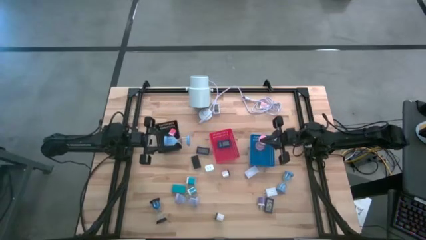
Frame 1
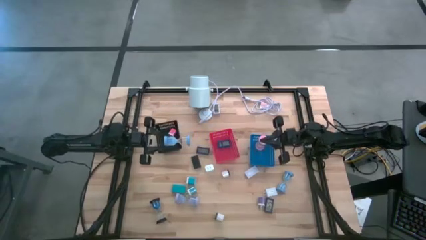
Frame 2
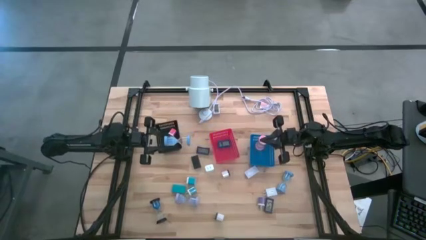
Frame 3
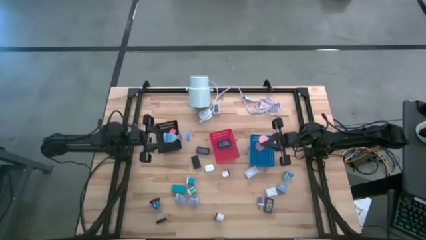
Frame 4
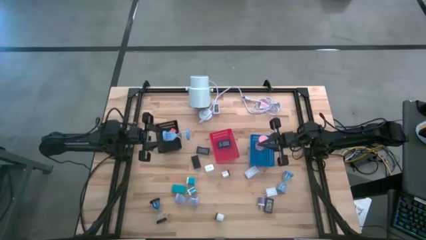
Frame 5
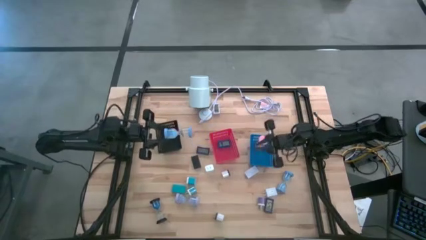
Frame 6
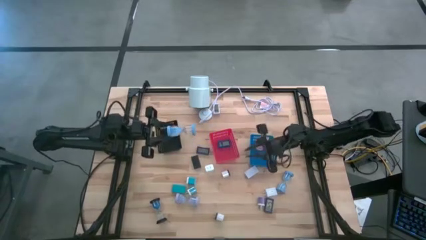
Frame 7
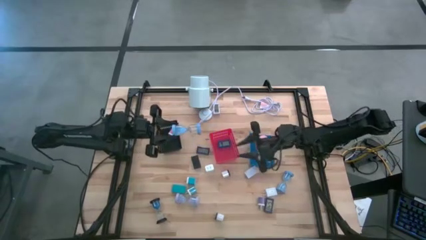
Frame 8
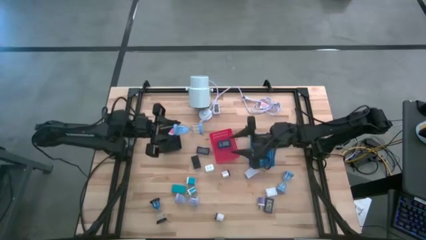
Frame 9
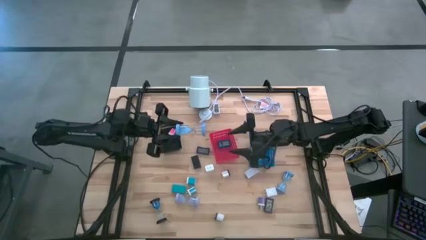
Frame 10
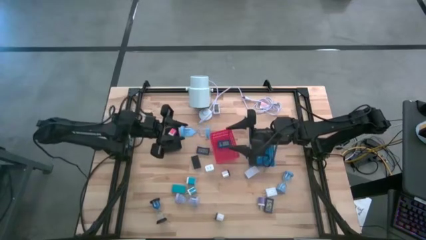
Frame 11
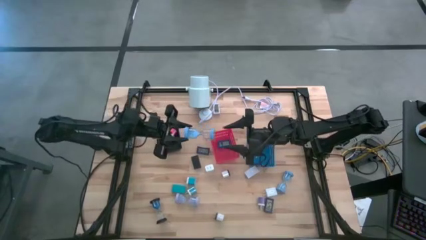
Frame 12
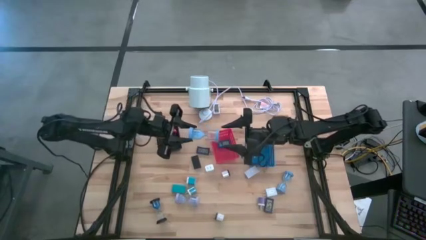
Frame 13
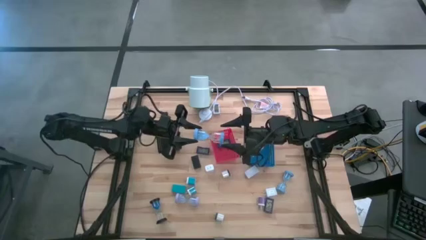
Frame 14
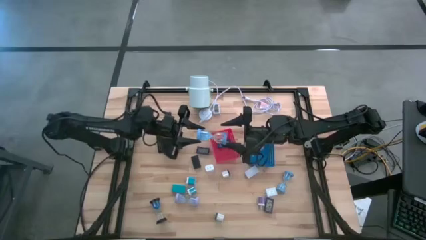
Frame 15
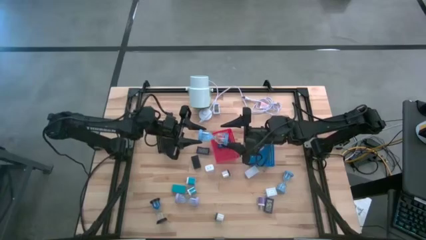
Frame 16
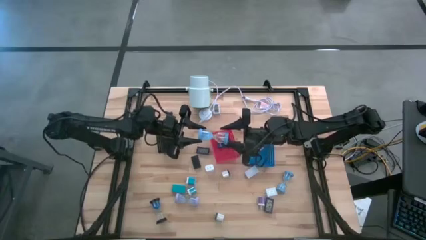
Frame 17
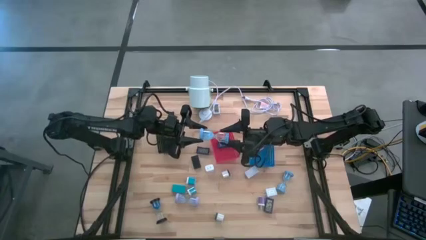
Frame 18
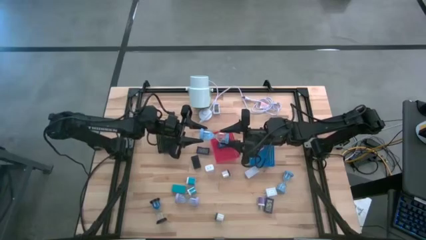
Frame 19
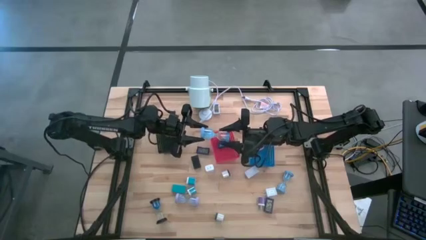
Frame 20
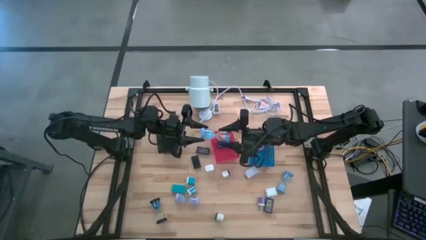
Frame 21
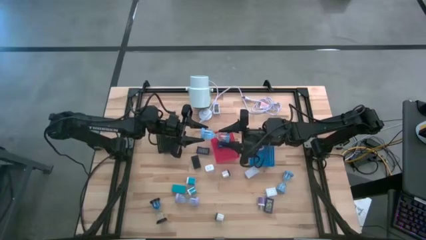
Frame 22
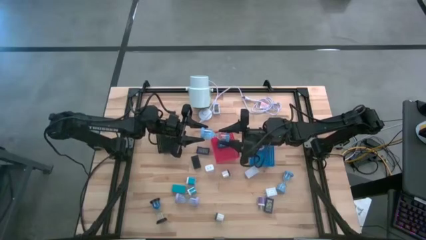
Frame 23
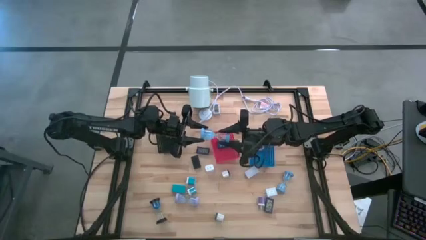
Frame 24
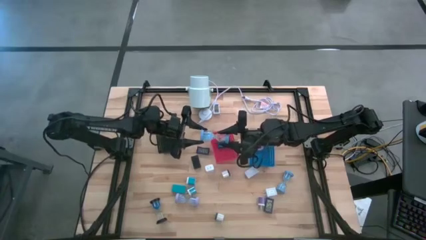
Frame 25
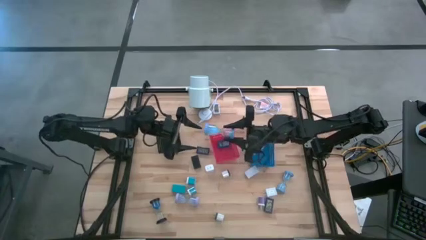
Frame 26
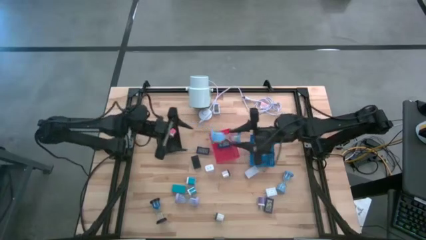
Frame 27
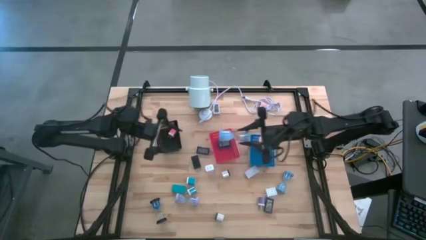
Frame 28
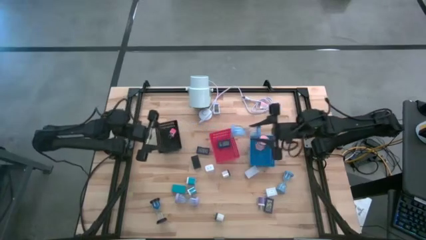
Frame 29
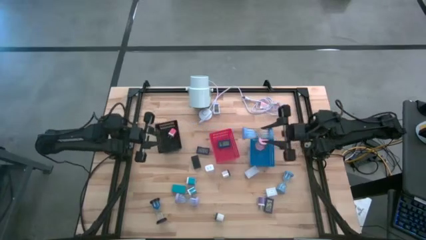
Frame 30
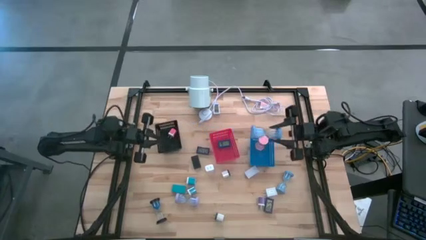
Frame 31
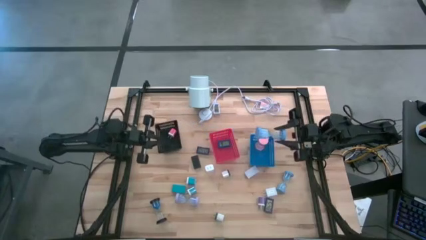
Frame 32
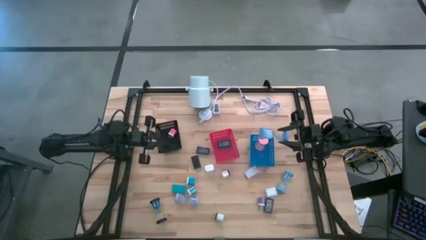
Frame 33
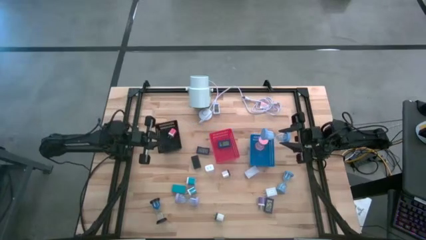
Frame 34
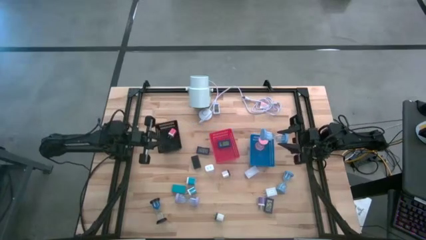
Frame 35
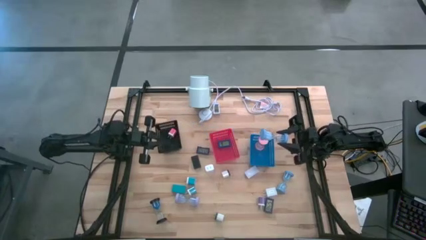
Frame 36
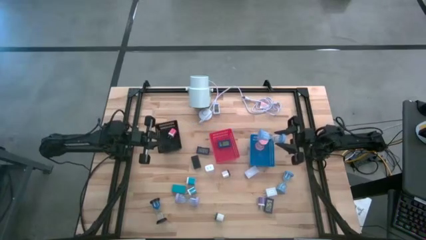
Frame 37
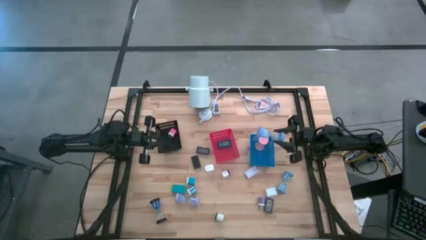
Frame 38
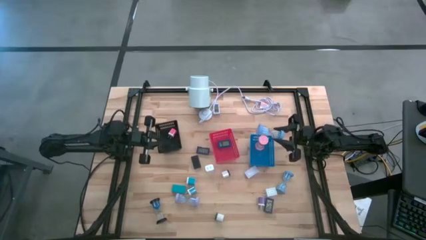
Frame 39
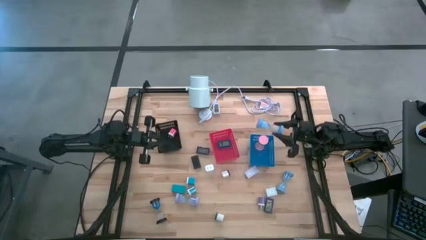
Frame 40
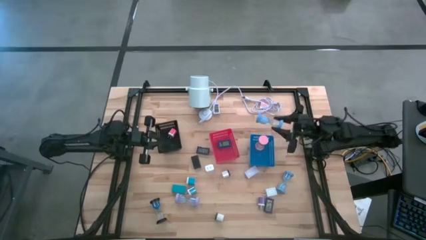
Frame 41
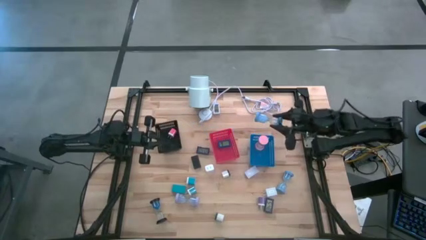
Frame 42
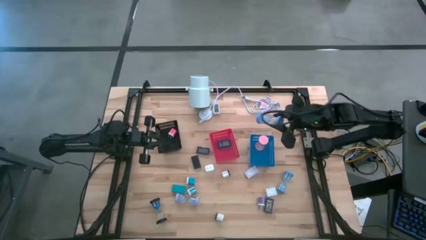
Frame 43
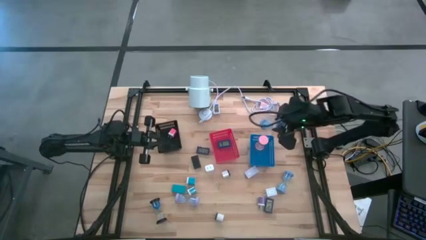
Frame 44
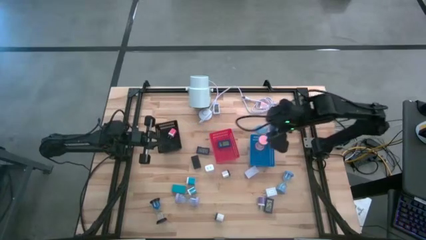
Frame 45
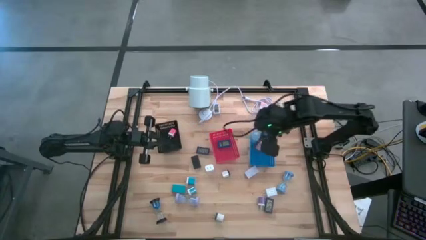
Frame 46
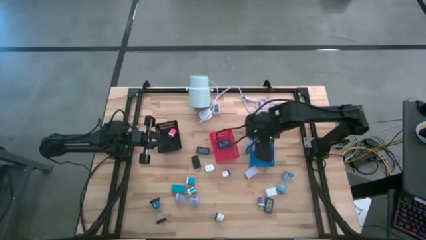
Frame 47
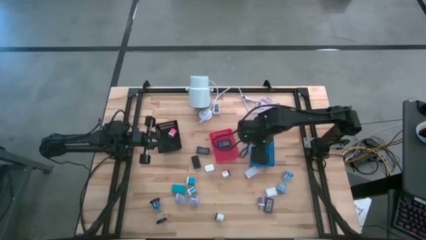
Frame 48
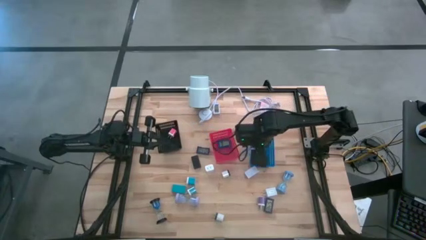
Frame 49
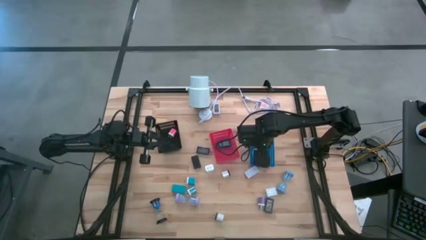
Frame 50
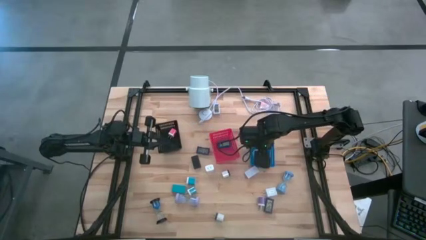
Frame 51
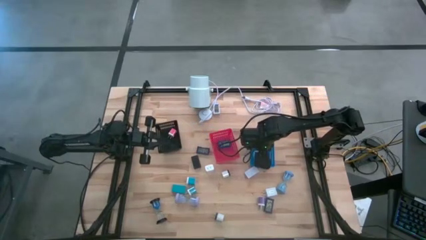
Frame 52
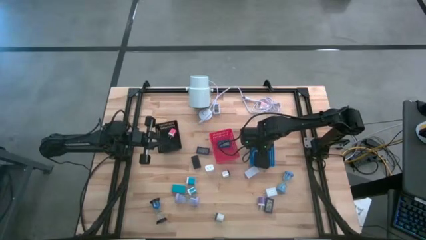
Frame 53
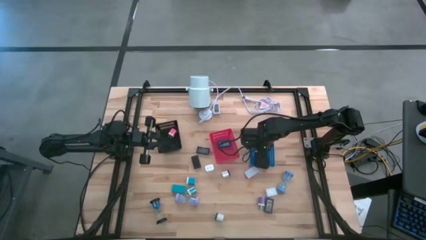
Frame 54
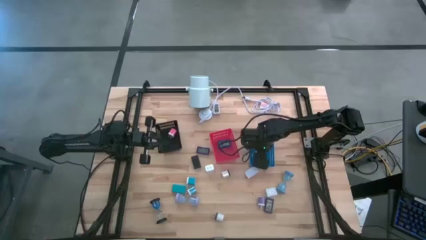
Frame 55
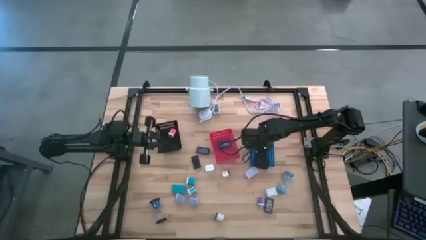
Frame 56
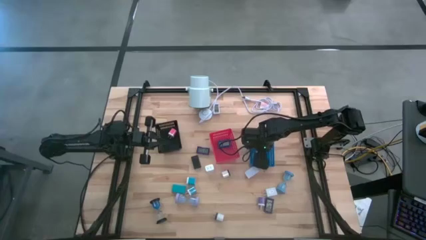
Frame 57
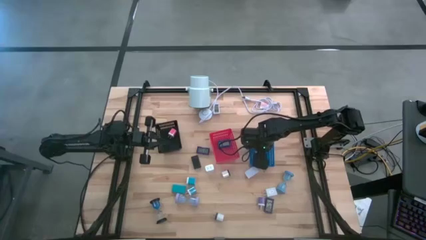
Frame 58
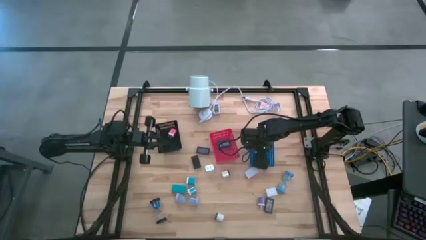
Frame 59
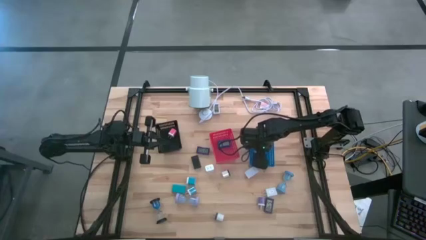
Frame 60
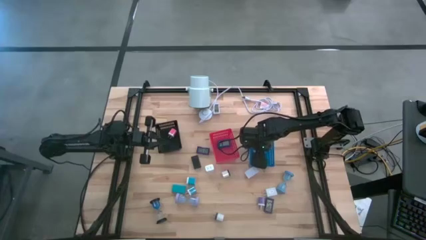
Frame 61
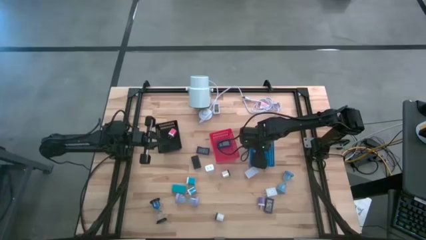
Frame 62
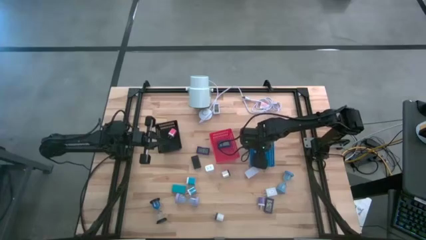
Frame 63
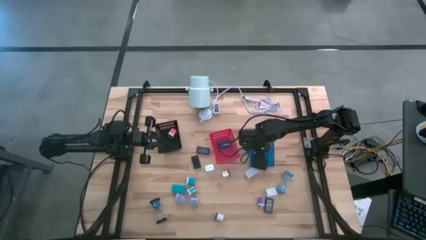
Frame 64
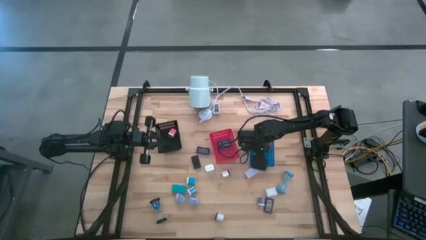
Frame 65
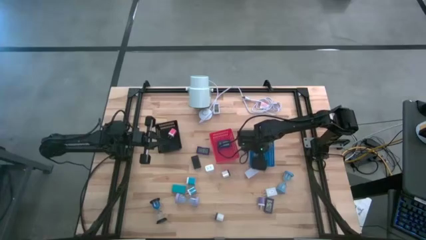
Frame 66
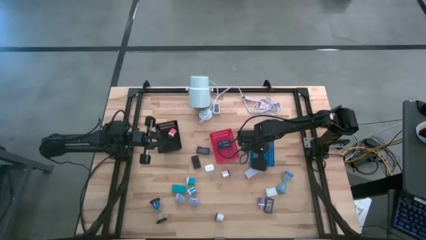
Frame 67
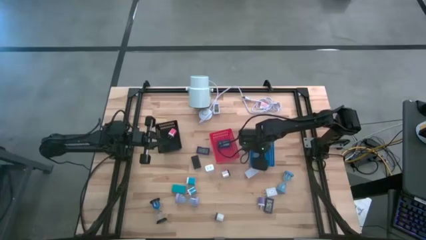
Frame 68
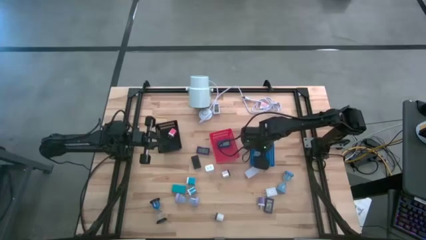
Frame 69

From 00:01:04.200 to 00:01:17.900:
Task: Pick & Place Office items
Put the top blue hourglass into the blue bin

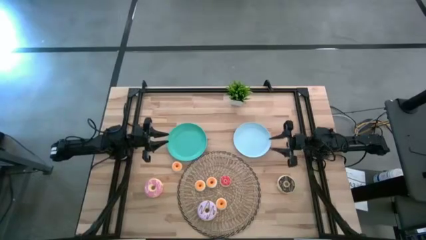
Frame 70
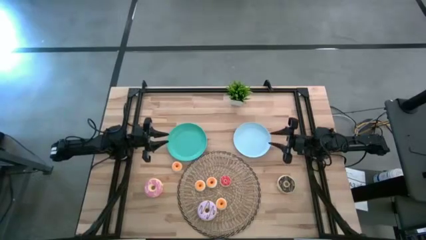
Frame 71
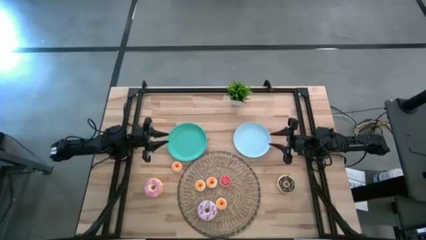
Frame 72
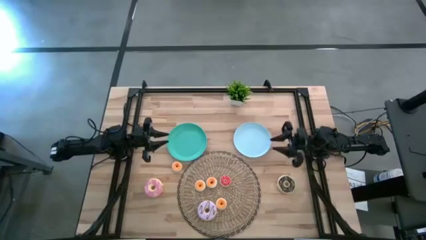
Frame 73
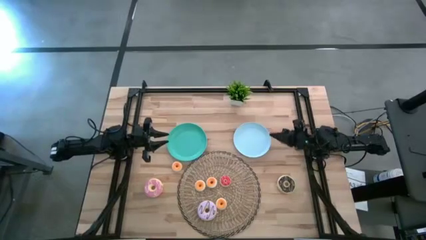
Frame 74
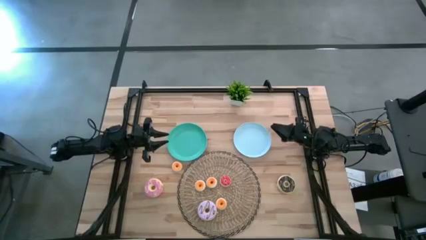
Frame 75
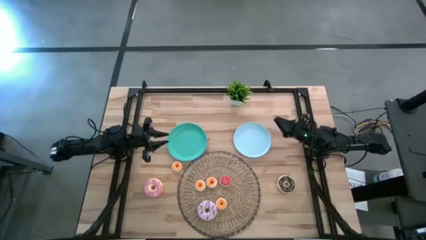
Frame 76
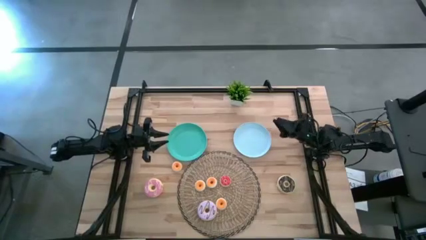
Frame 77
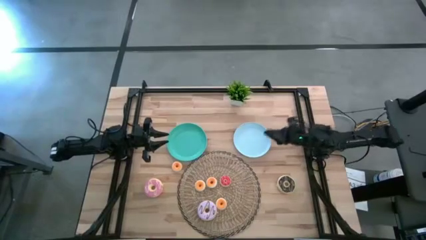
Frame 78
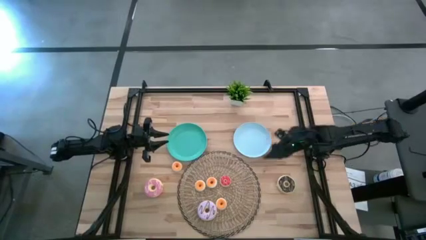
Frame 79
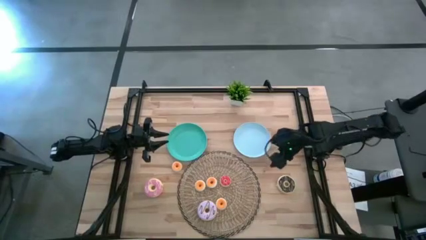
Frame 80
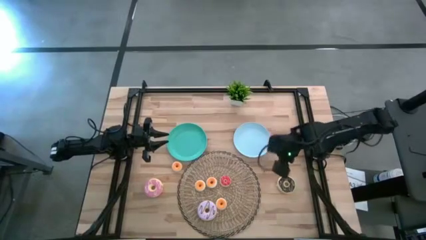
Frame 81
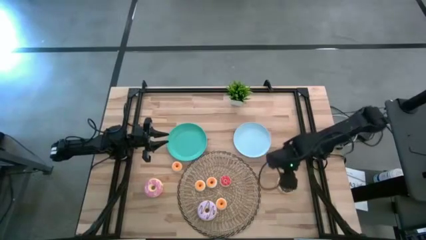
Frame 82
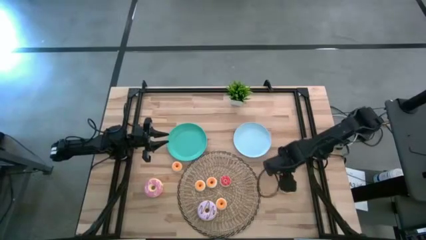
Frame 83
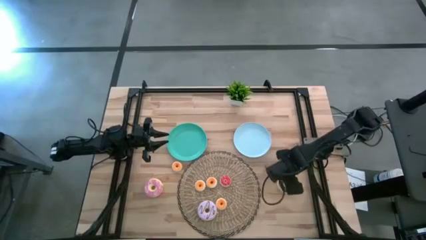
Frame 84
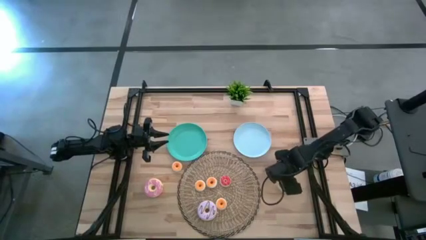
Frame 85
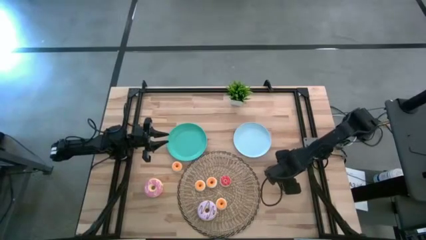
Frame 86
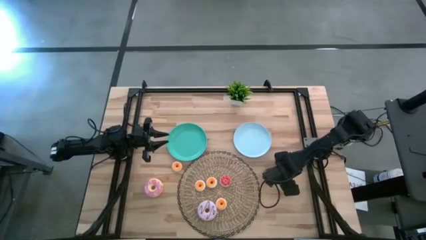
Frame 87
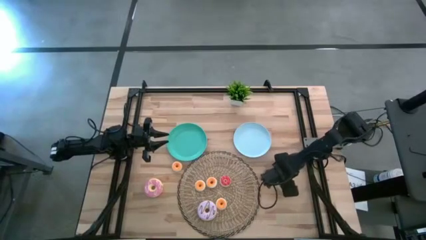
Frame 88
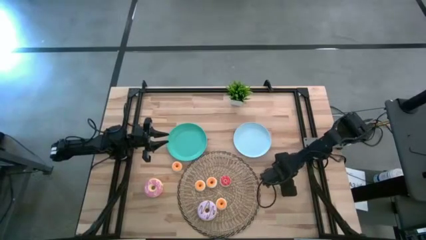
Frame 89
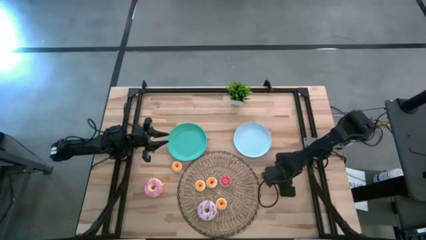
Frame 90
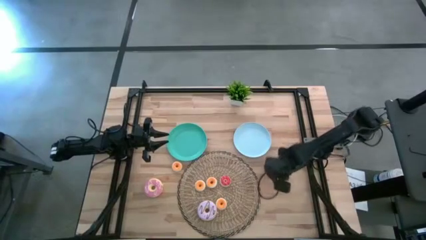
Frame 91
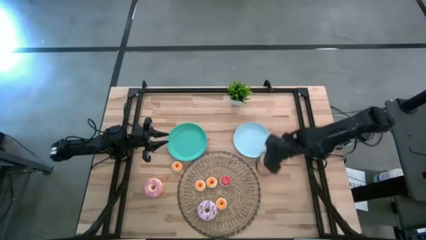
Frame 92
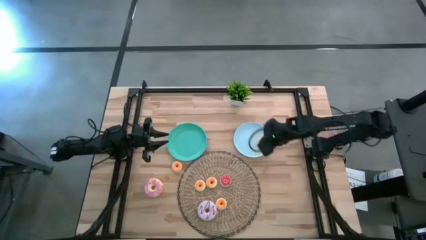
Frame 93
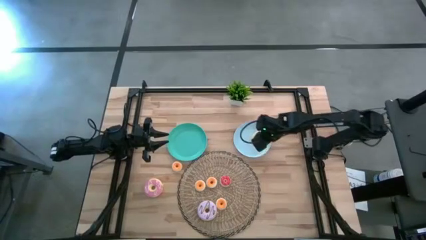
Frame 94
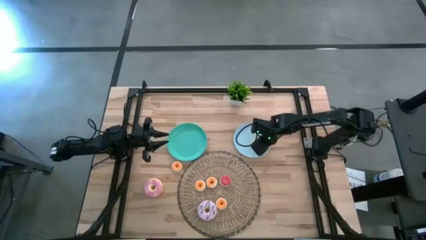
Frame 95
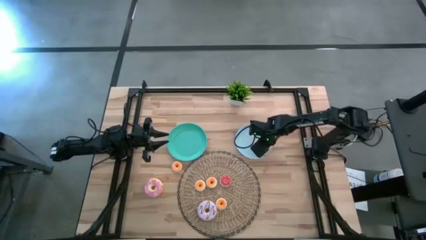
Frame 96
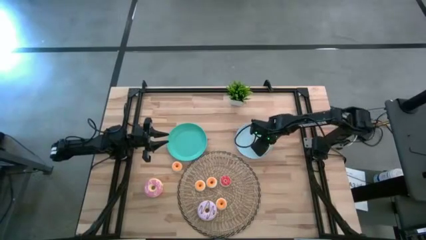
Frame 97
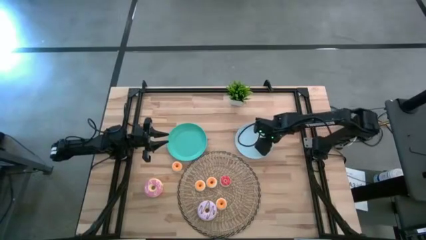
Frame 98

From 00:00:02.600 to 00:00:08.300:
Task: Pick & Place donuts
Put the big black doughnut on the light blue plate
